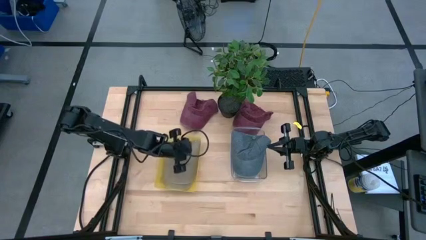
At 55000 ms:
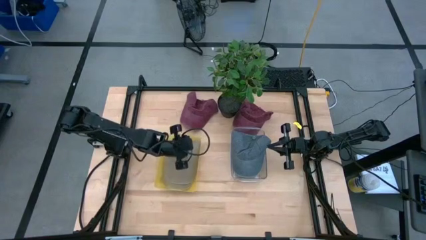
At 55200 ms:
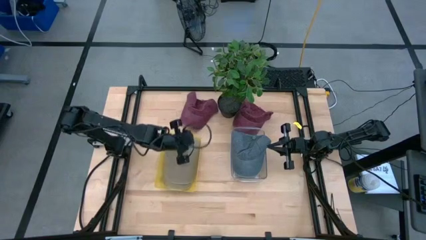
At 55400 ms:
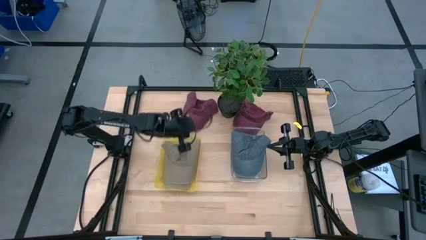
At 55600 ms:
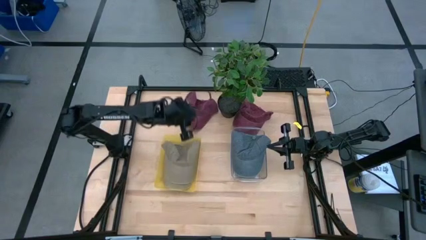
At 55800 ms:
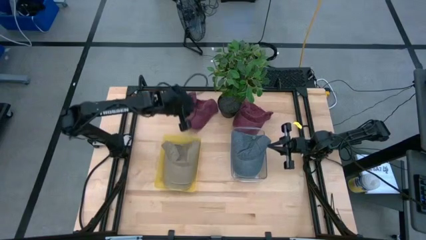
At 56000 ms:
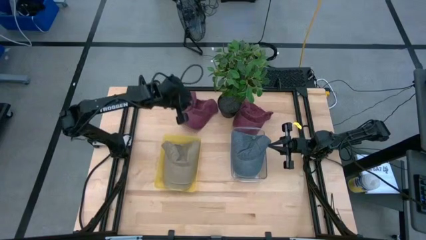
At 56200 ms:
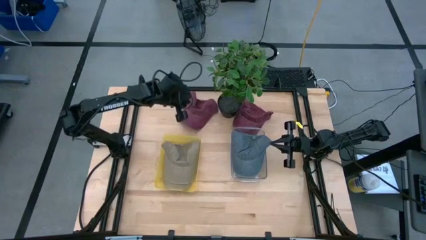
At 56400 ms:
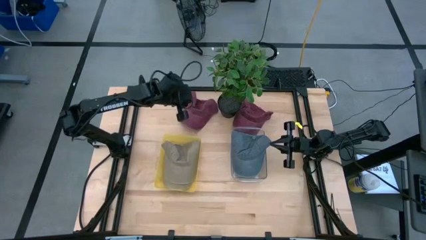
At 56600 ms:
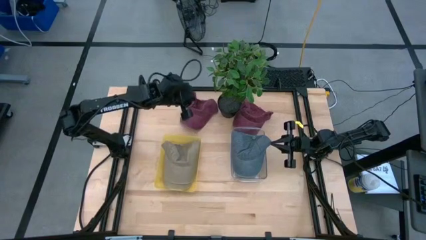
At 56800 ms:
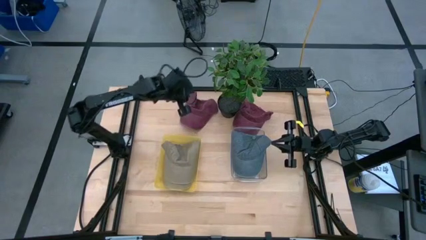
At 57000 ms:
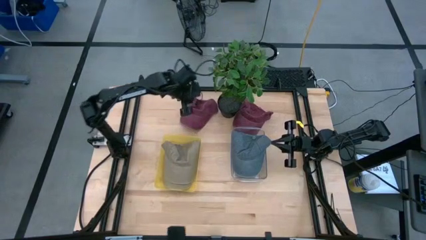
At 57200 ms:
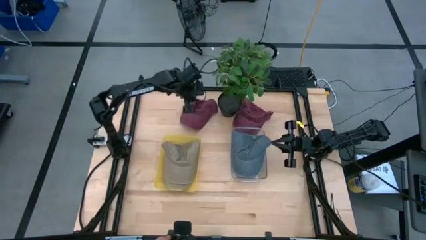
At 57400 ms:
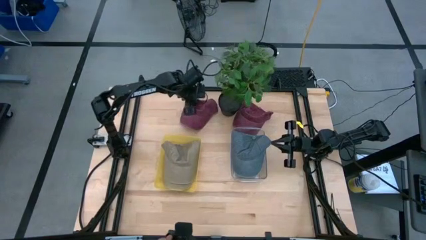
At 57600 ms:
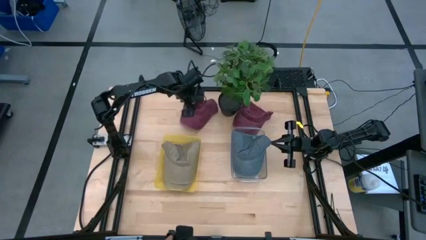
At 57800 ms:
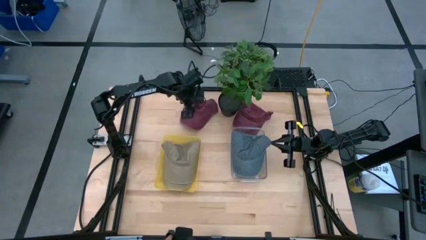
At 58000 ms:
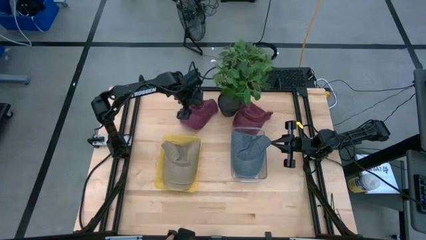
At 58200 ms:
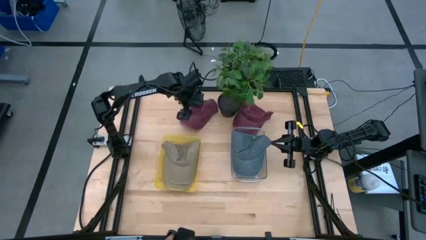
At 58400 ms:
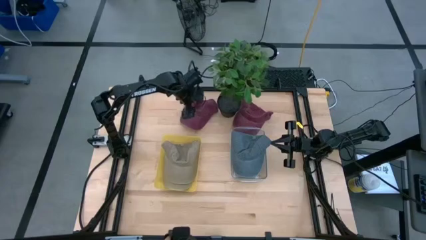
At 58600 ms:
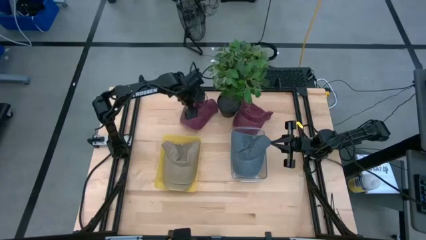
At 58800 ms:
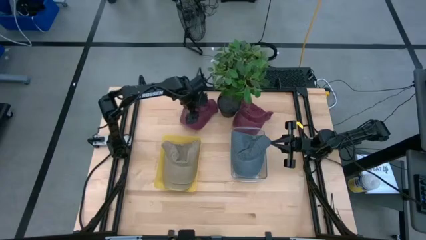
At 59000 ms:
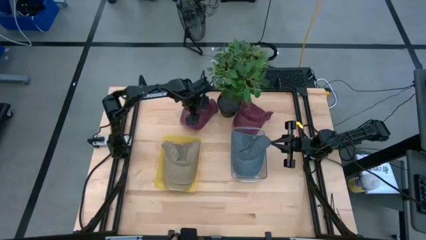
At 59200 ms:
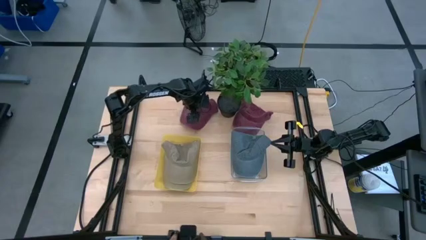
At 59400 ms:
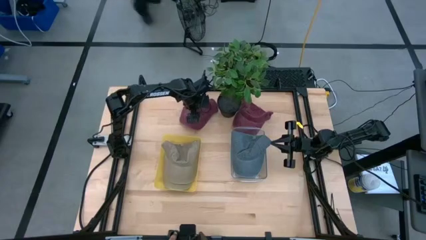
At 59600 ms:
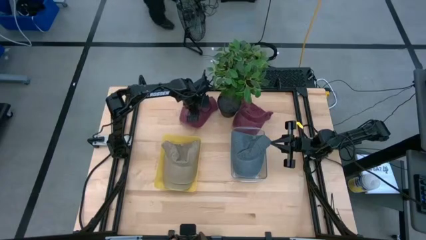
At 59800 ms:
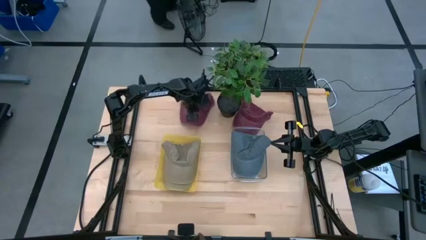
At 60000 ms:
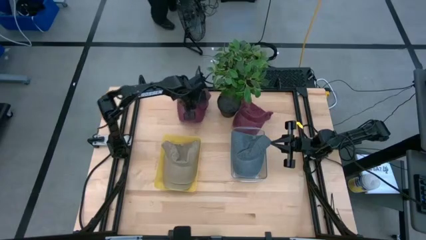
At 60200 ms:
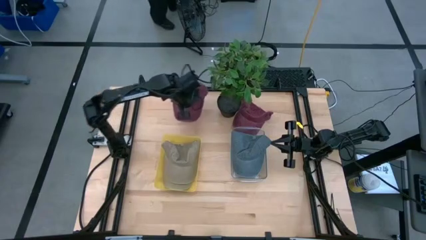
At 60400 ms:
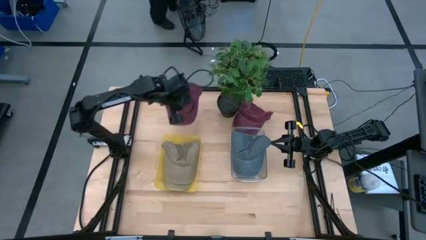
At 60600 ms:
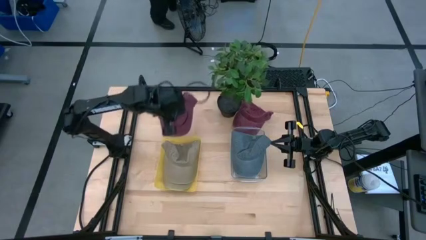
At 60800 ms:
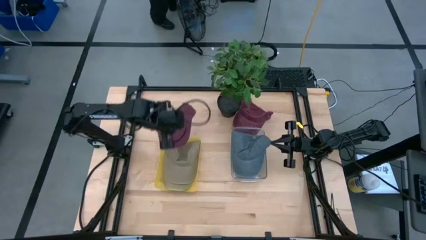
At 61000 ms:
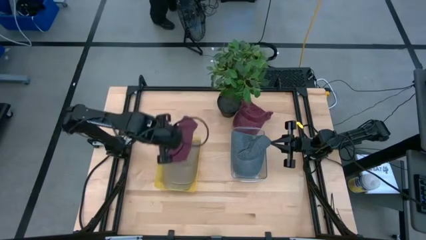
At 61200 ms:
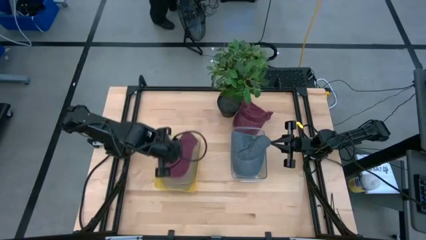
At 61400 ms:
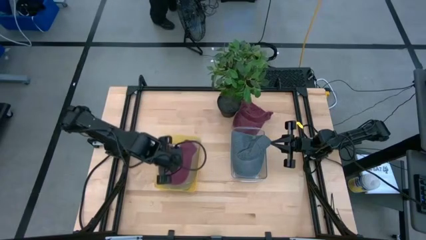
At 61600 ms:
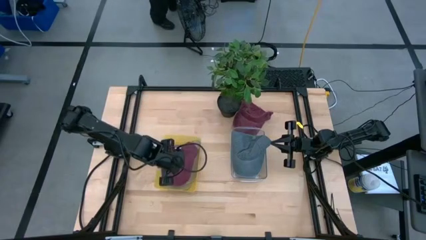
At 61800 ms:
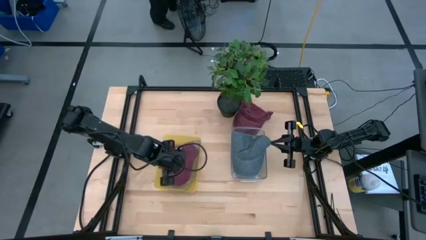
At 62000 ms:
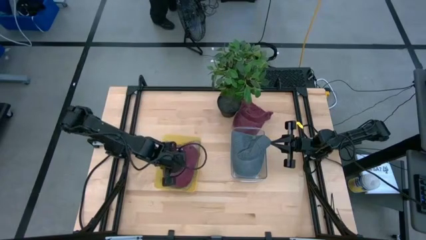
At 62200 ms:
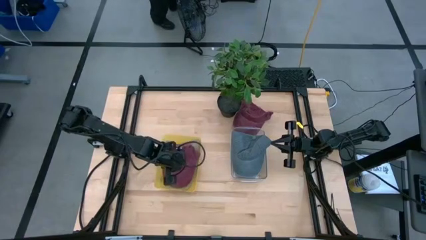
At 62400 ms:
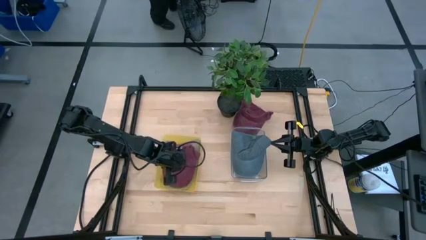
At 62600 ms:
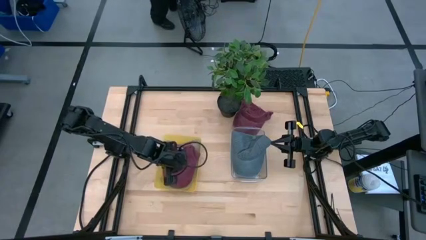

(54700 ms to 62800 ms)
Task: Pick & Place hat
Put the left red cap into the yellow bin

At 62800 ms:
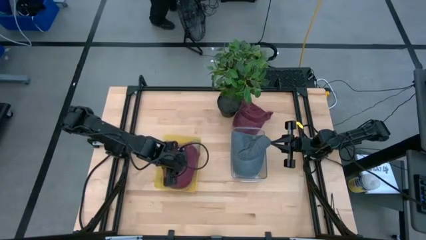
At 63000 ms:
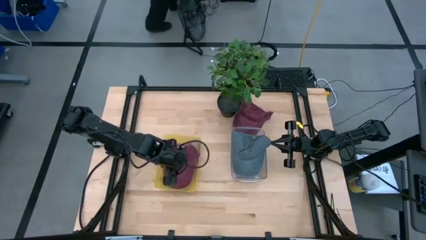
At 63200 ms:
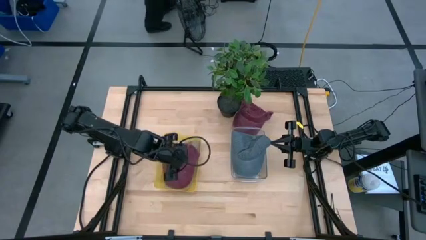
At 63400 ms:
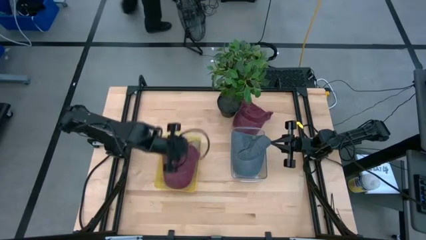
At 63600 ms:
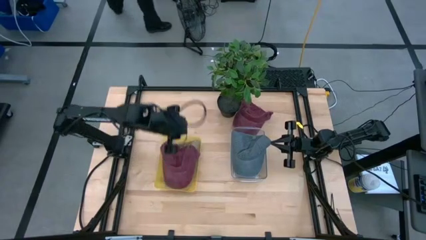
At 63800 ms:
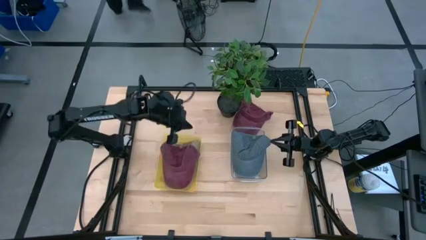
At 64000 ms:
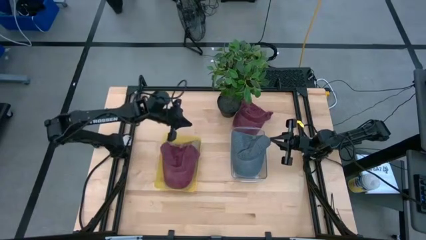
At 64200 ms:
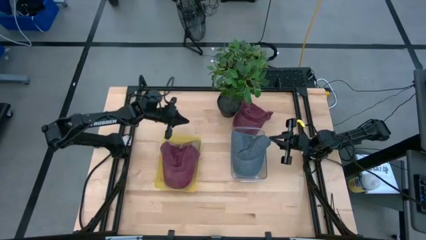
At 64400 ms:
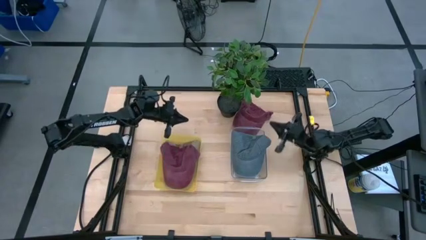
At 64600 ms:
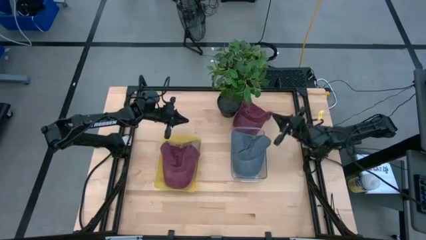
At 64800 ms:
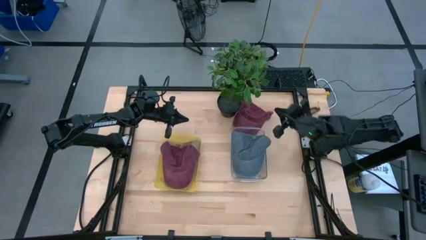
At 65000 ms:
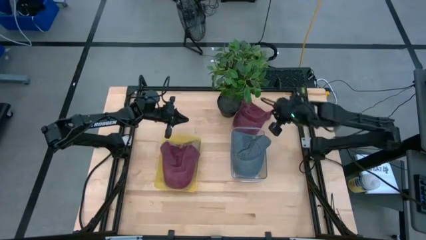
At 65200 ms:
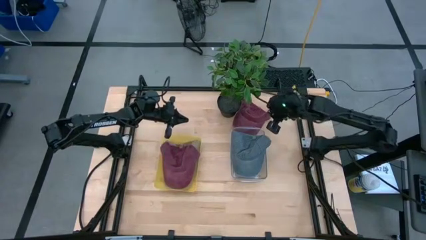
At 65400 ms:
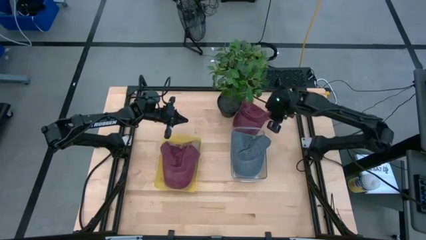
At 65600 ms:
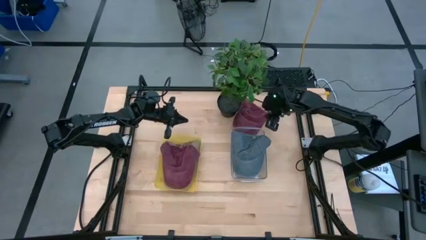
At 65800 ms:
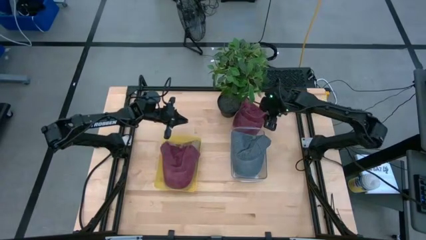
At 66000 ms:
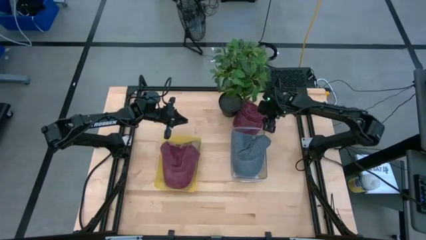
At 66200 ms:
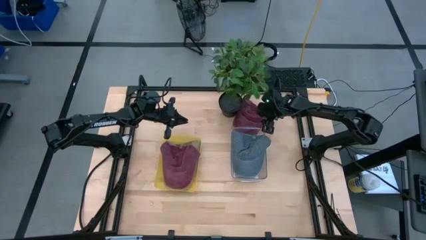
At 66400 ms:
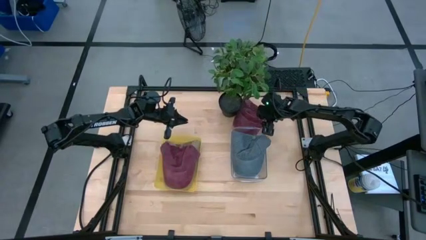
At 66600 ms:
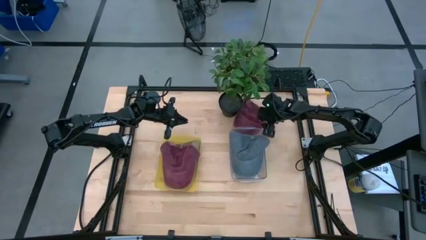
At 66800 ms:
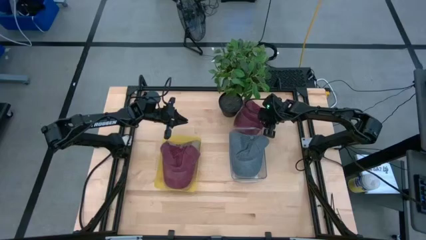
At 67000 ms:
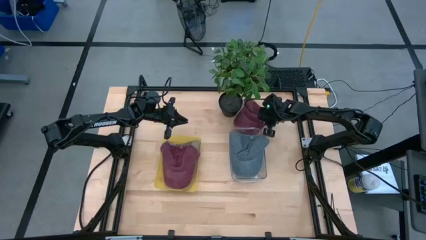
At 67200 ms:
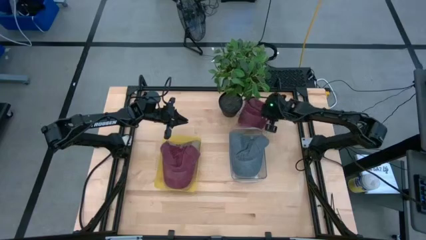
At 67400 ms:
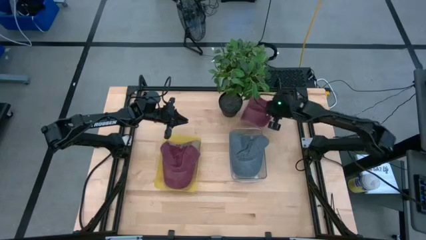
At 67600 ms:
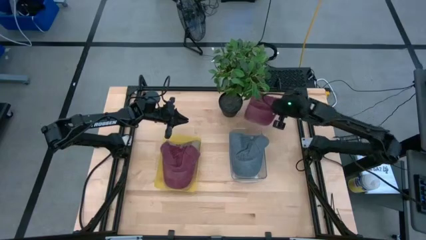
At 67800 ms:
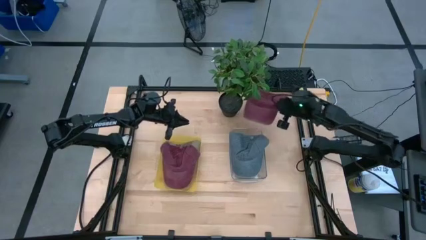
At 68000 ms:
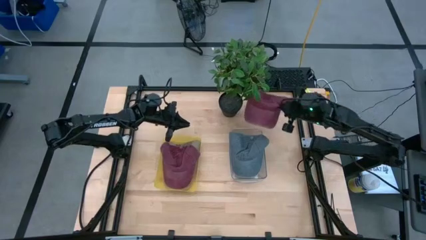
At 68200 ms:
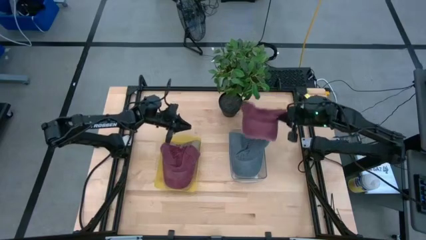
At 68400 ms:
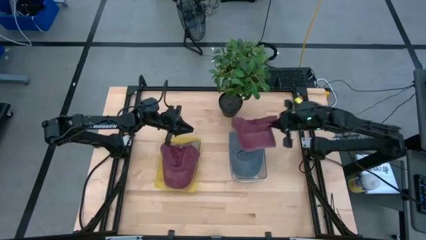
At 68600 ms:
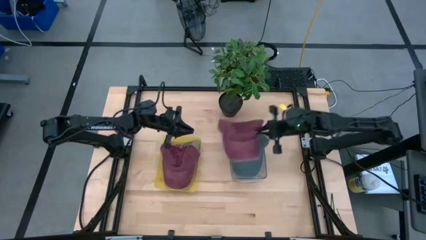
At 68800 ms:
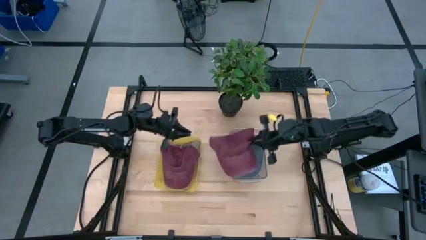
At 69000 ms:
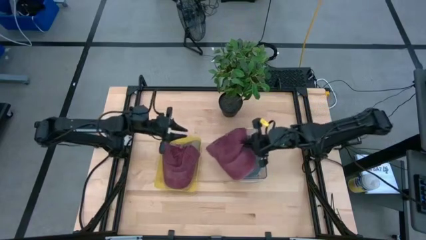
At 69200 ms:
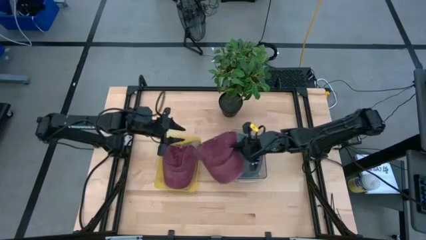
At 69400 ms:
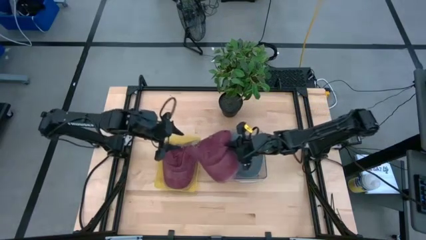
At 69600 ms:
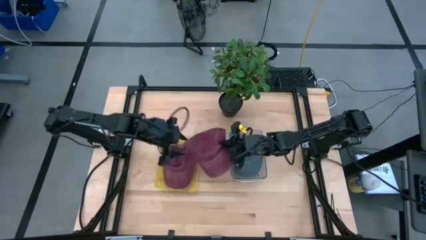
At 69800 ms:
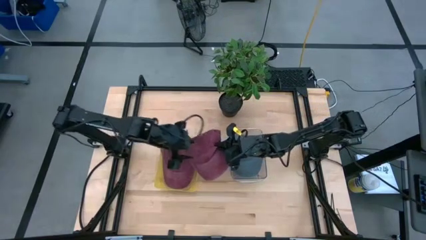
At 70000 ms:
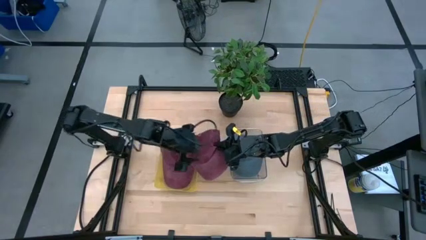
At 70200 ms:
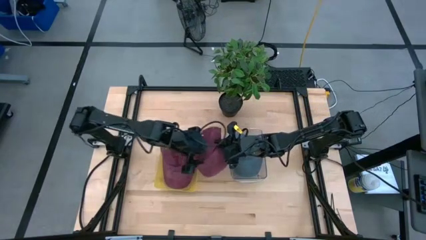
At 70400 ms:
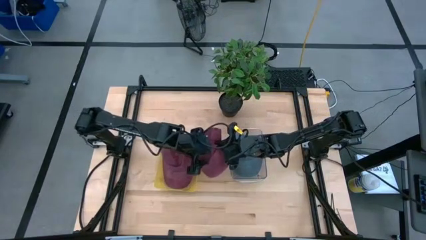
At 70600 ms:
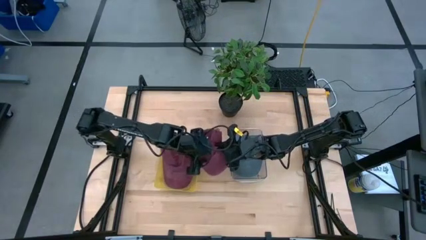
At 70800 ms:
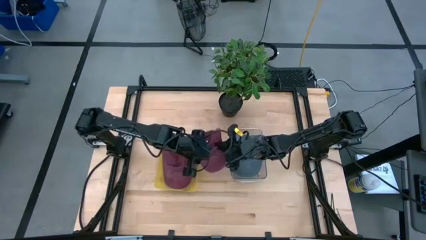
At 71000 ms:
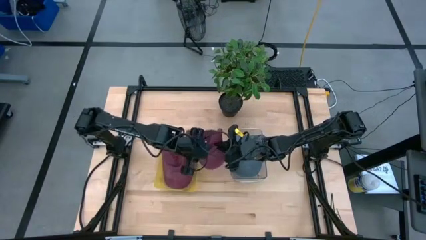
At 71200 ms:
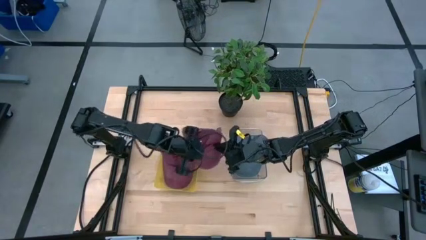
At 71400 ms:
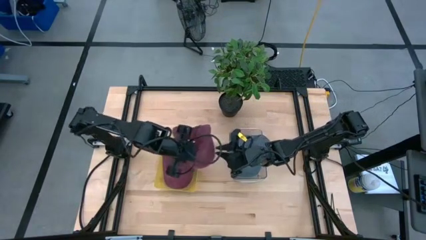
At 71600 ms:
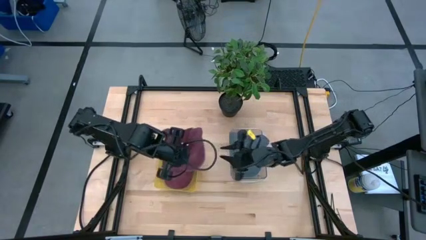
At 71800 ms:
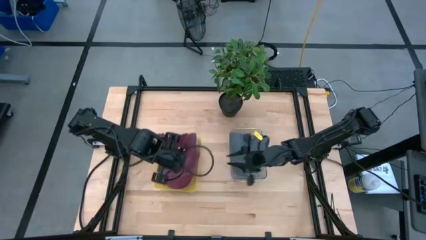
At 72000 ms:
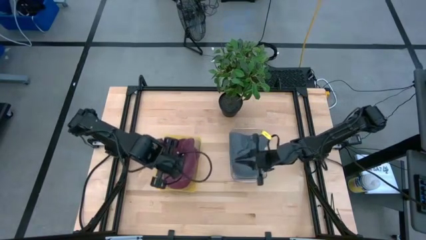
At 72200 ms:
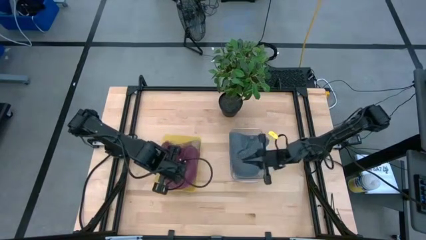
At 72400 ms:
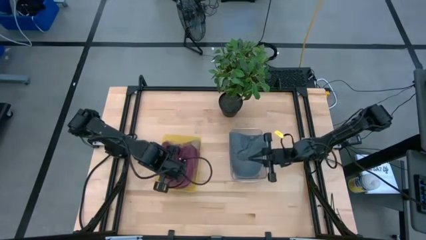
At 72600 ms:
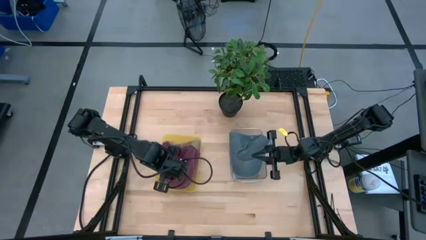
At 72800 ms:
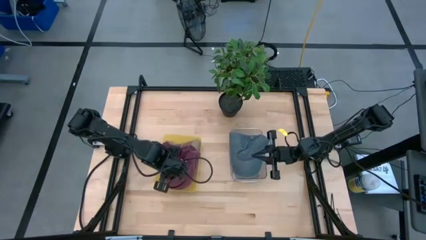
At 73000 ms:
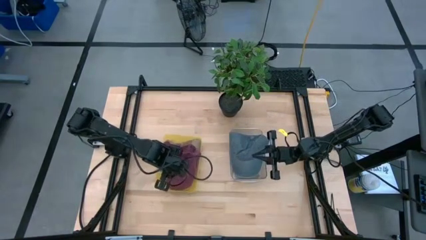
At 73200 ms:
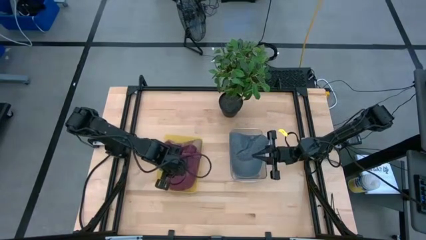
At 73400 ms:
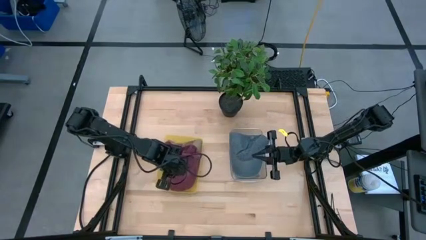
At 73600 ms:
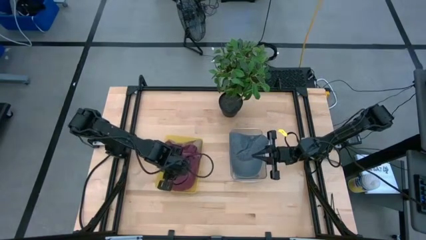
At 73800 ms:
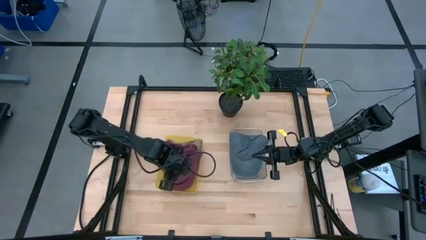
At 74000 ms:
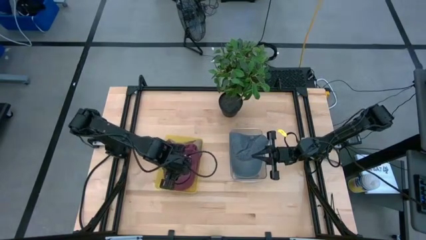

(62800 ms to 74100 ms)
Put the red cap into the yellow bin
